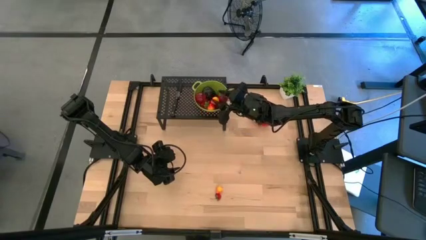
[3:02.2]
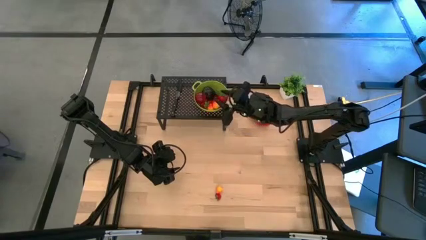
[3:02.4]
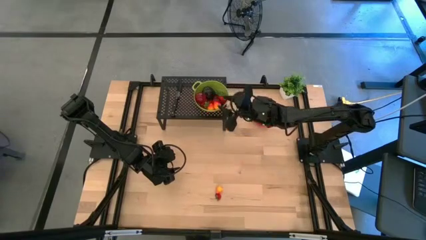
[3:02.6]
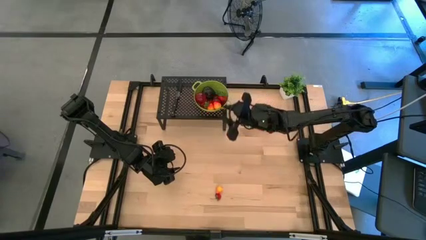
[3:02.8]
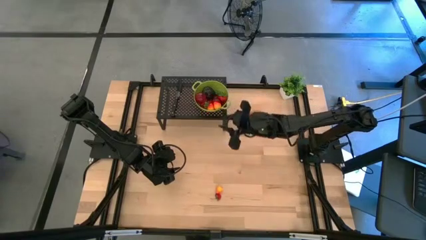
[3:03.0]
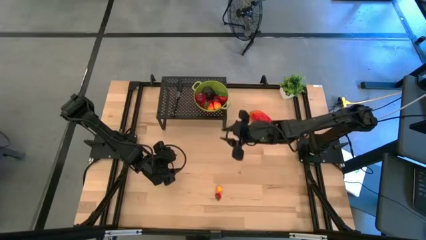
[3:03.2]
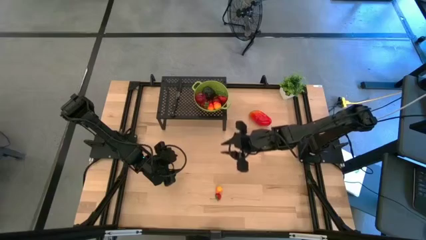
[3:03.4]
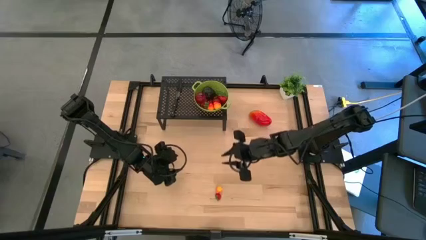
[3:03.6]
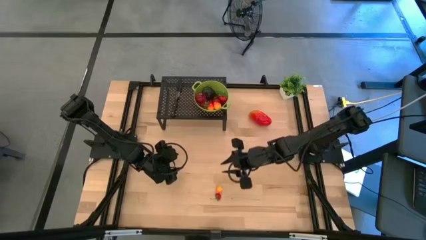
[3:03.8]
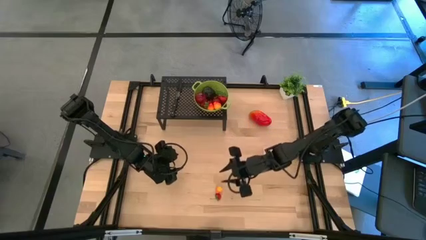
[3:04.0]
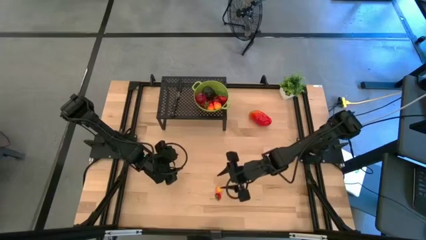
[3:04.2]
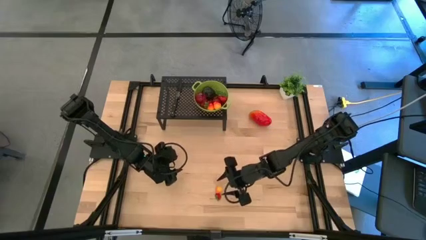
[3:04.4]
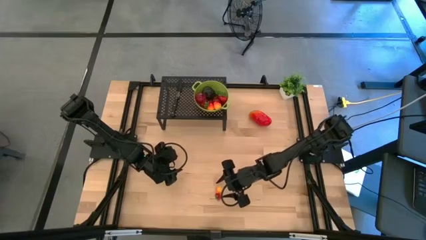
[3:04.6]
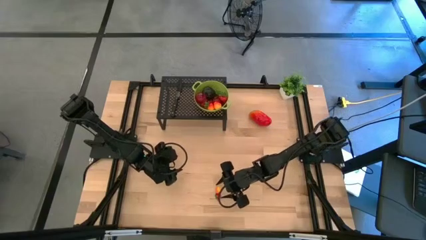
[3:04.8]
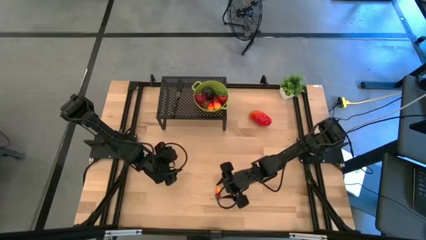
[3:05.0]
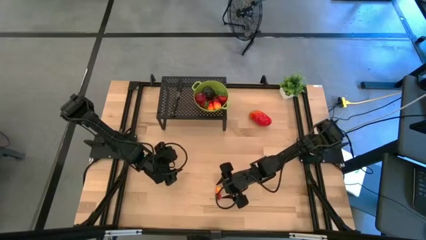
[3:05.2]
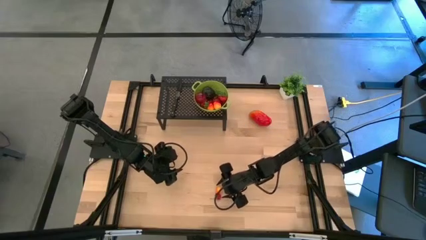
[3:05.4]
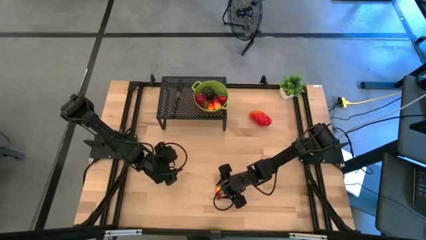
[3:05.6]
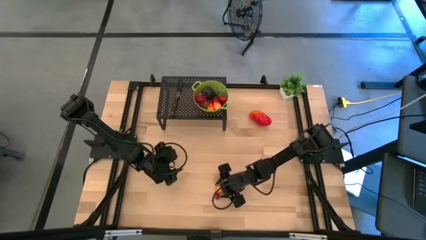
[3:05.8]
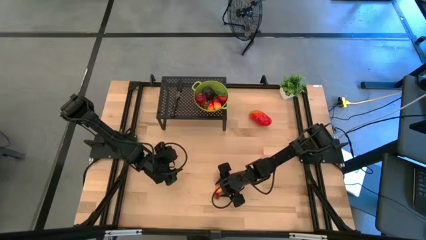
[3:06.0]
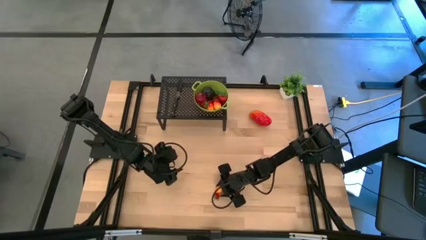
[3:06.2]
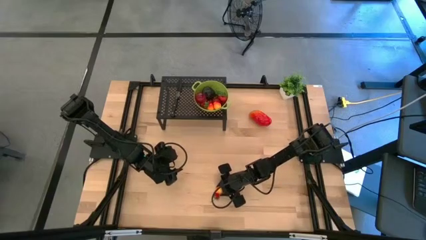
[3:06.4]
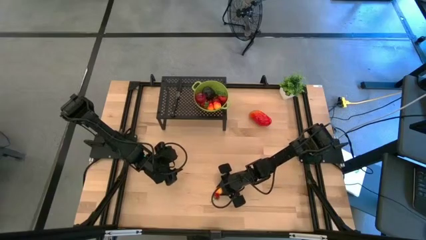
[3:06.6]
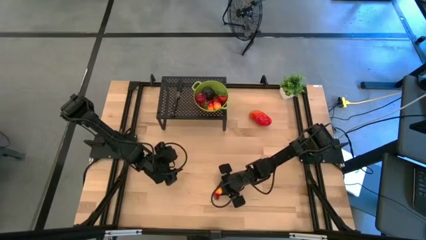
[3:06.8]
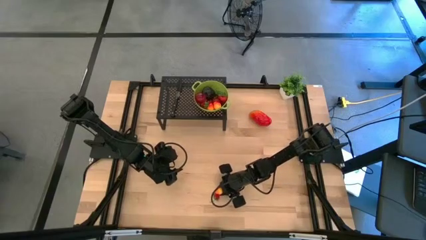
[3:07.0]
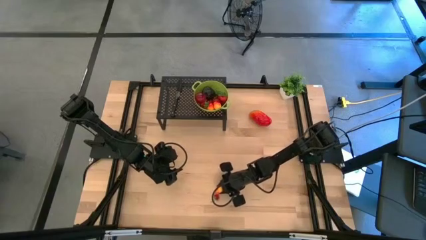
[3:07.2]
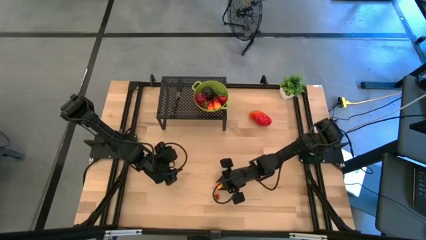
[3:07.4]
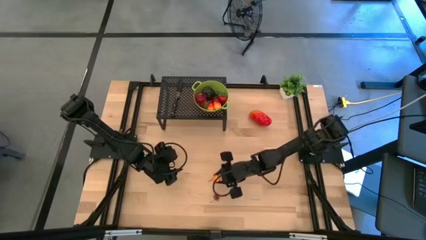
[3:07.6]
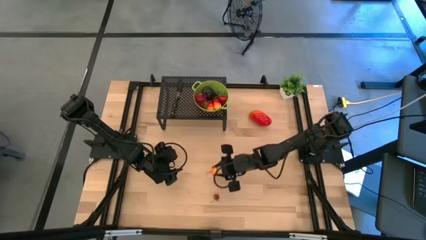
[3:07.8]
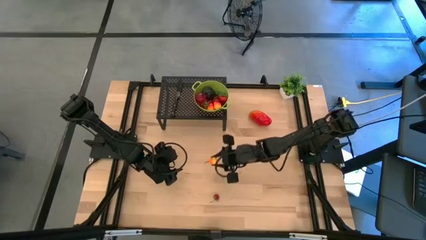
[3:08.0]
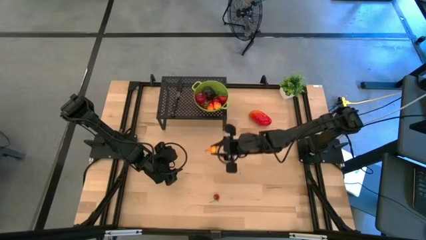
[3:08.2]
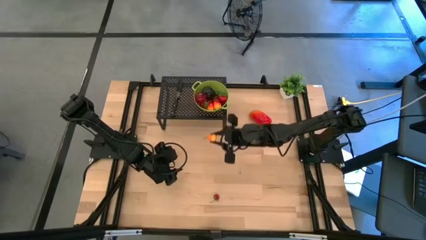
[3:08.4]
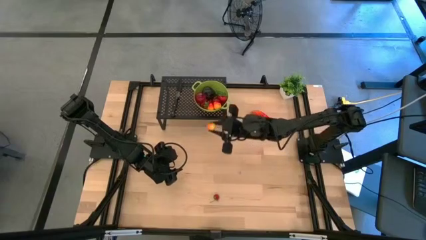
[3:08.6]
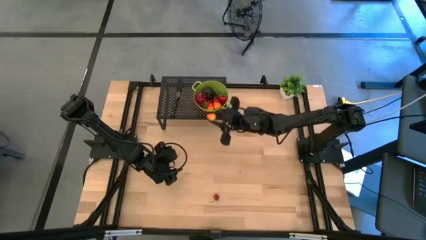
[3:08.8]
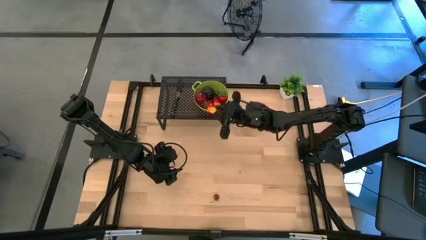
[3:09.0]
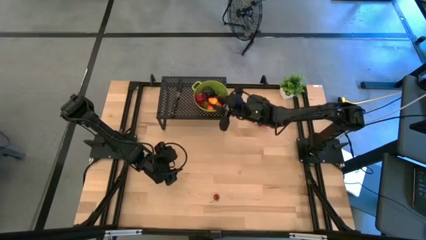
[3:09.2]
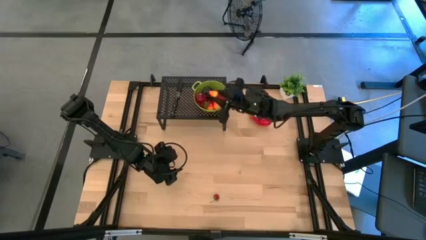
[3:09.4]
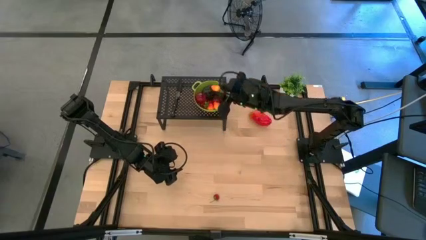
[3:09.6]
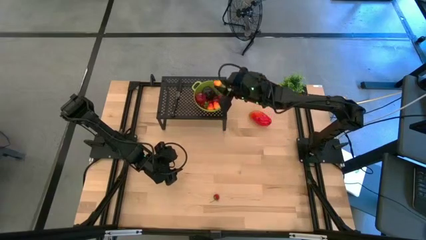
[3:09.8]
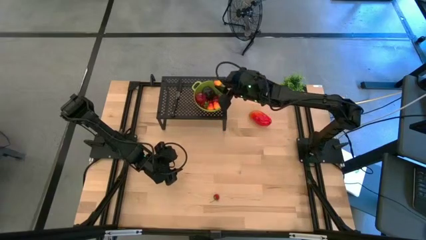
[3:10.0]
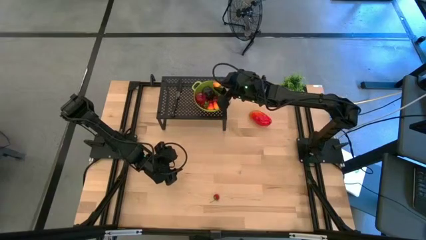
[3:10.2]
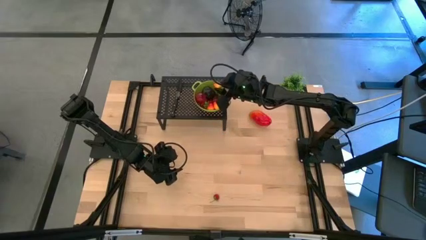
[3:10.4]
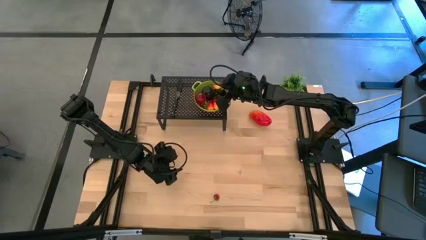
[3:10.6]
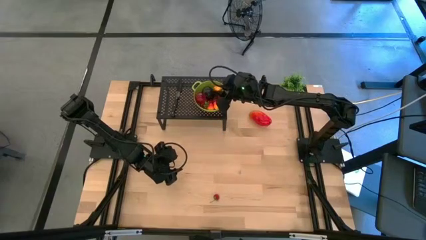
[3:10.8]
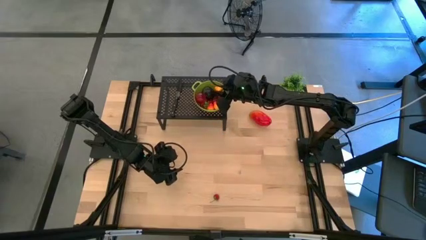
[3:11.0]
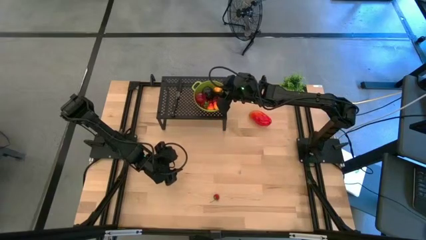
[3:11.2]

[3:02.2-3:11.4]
Task: Pick & Place Fruit
Put the pear into the green strainer bowl on the shelf

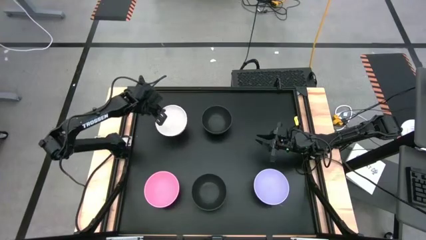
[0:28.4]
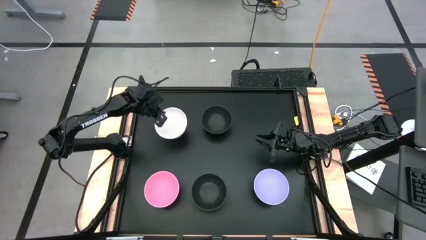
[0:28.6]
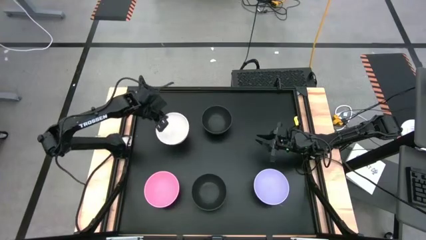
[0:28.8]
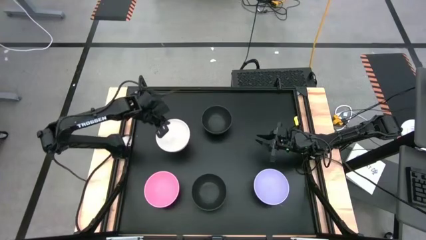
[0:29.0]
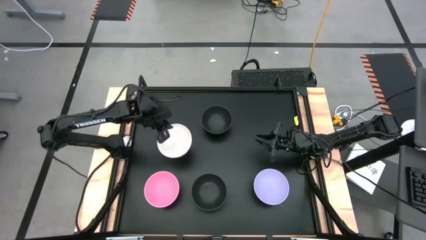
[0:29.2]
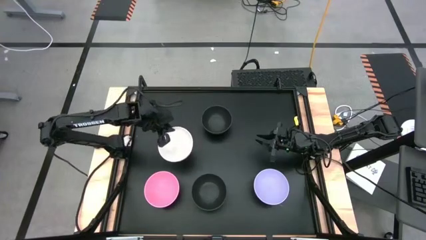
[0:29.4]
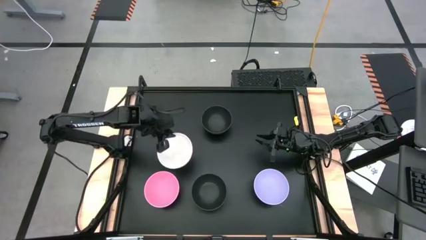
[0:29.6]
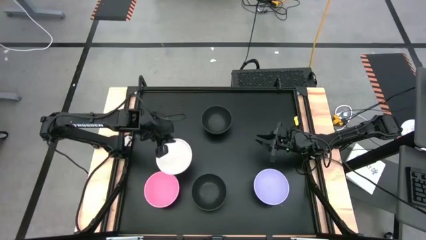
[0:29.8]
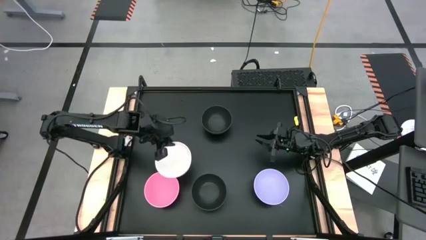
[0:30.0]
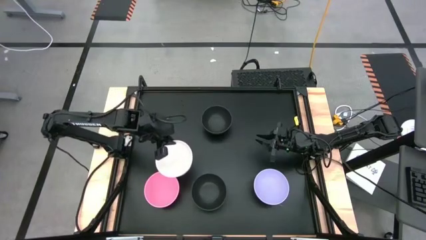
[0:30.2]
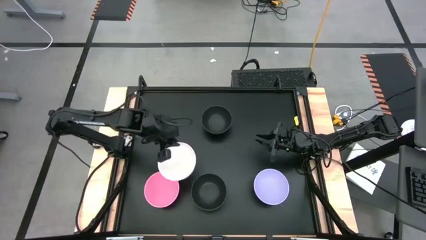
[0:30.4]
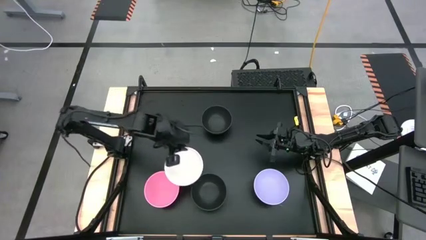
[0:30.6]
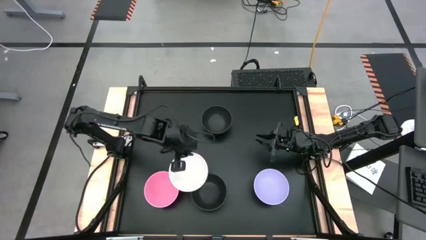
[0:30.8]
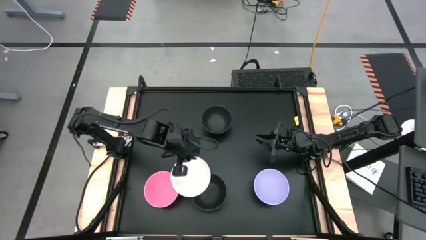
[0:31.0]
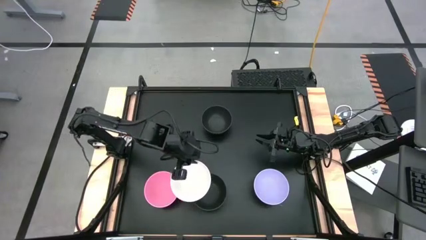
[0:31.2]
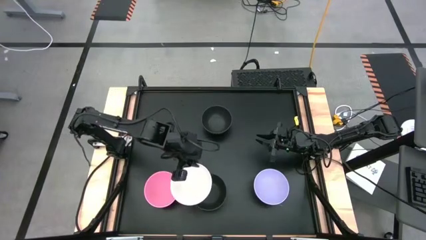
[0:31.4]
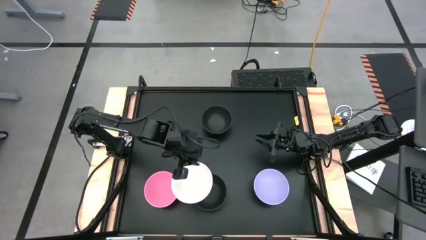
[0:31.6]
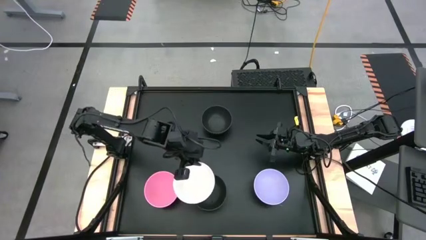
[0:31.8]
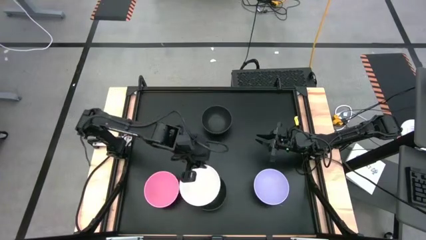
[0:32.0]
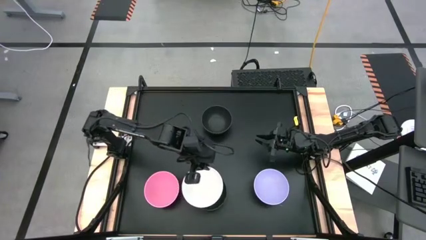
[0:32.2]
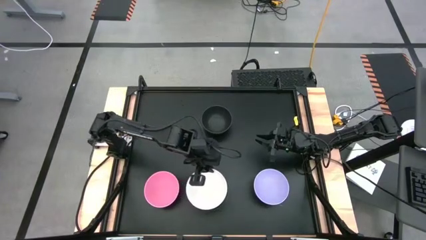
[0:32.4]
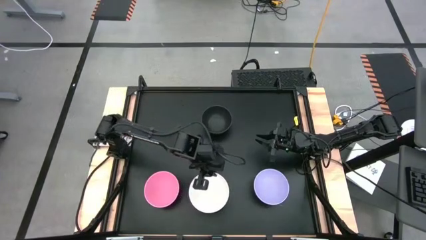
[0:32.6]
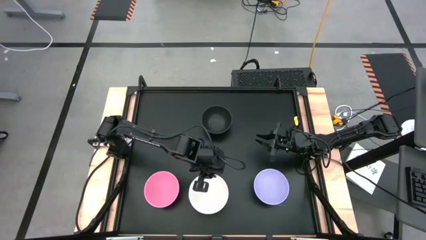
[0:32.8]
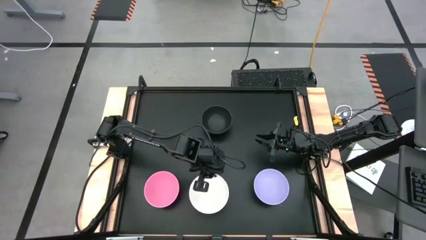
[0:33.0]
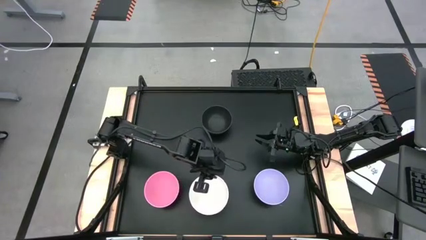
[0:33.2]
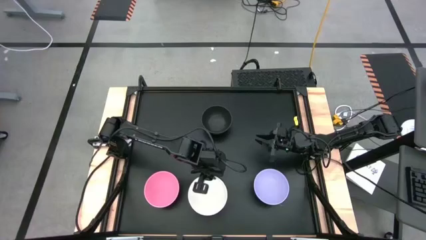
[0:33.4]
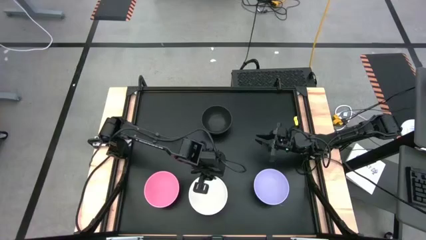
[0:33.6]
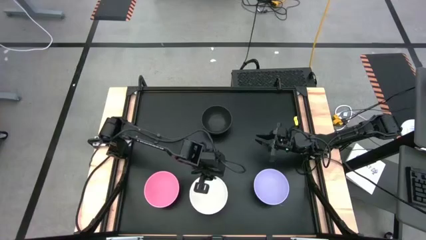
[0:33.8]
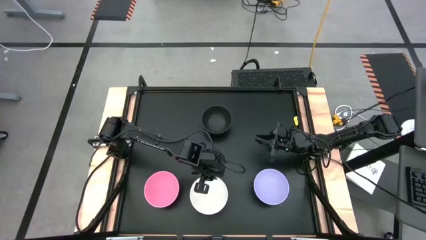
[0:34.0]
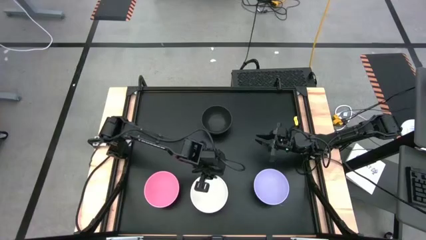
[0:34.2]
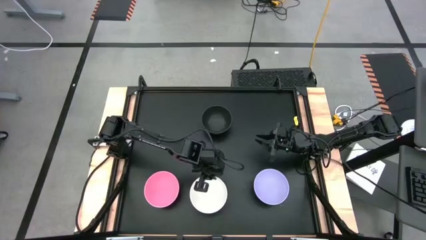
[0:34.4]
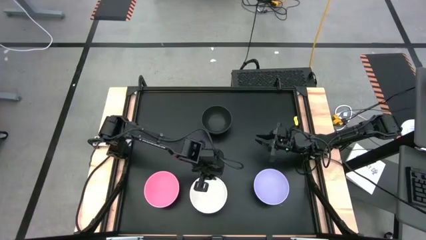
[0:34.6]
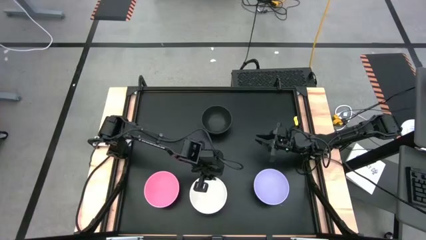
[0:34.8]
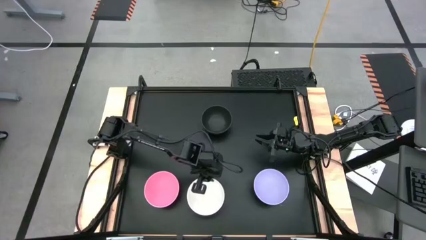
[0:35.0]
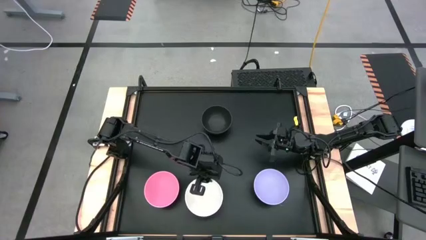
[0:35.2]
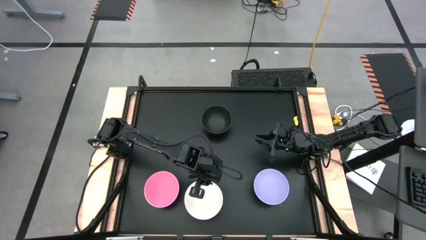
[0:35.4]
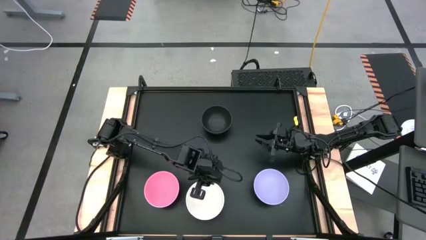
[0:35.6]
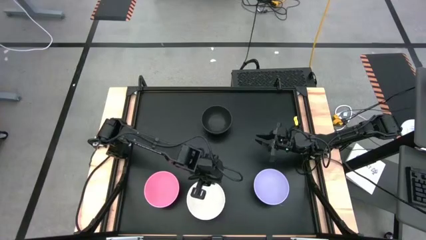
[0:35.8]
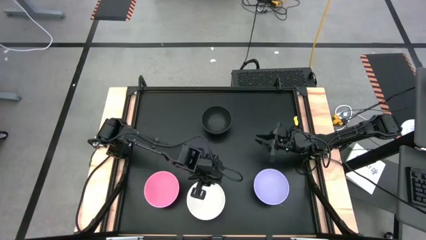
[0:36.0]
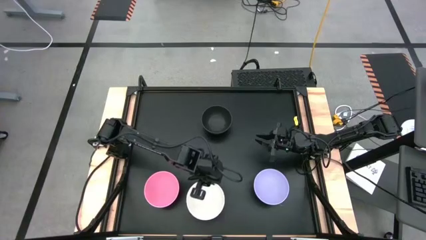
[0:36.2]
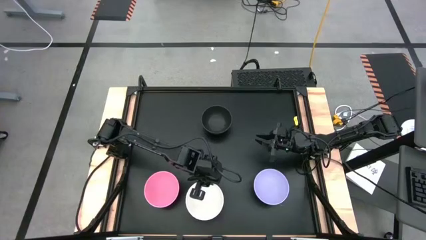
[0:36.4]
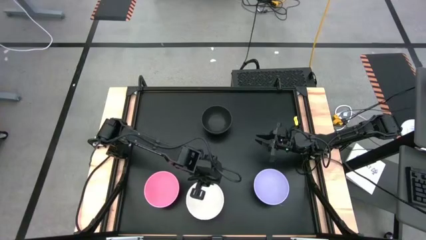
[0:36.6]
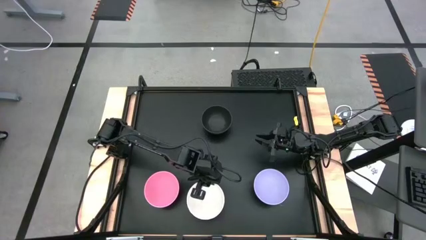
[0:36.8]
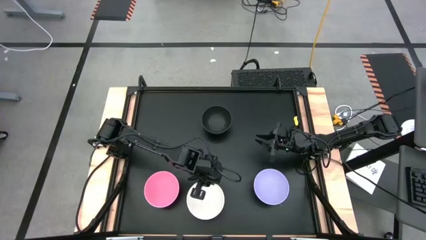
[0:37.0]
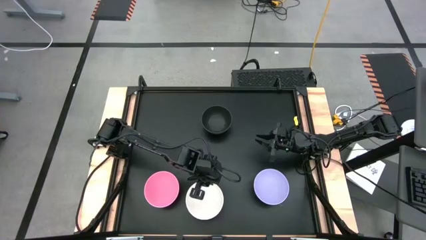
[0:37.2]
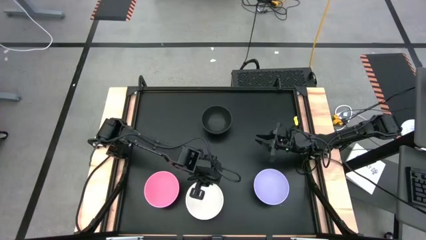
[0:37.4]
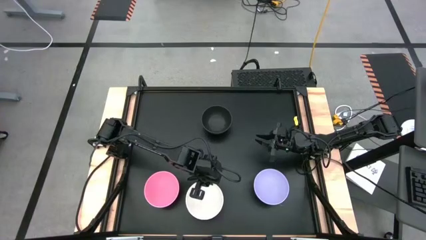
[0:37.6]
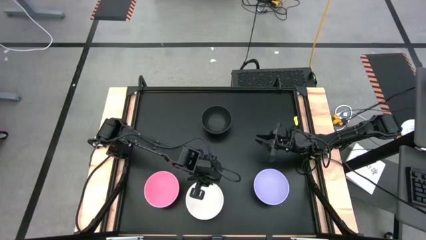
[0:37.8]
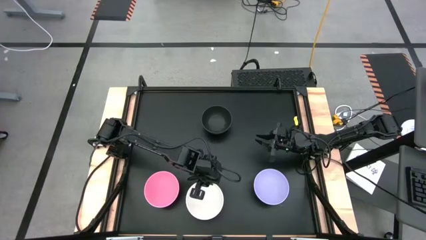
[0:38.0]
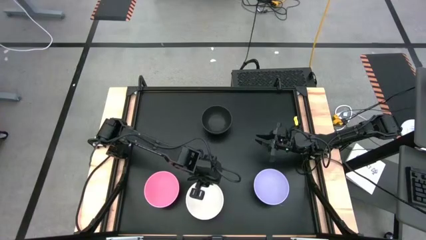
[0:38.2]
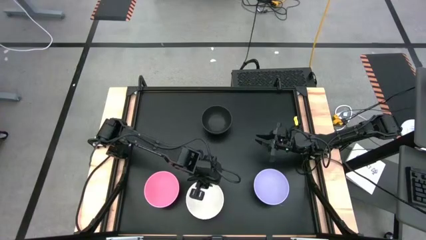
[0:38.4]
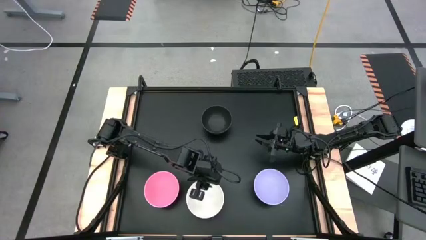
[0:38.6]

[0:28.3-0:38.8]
Task: Nest bowls inside each other
Stack the white bowl on top of the stacked black bowl
